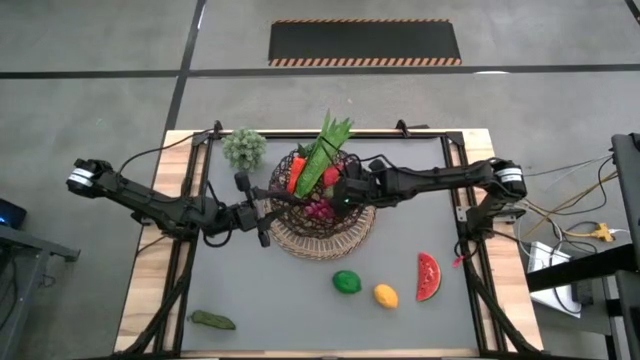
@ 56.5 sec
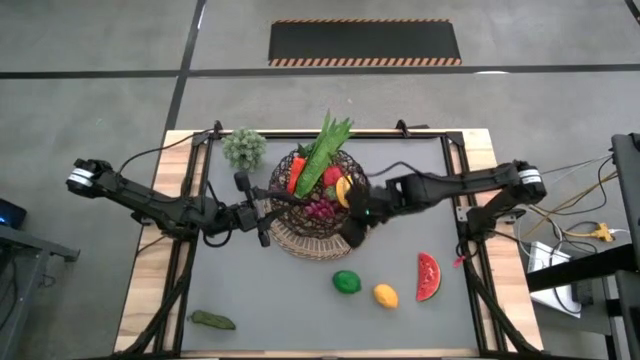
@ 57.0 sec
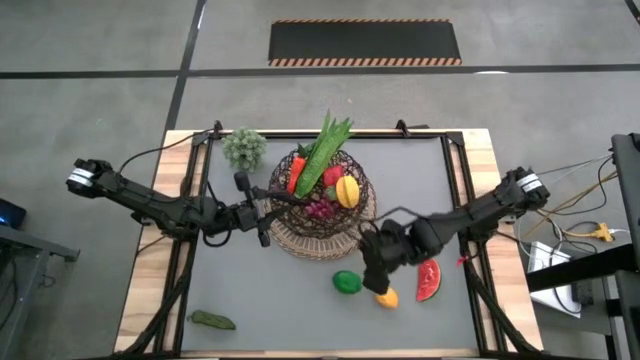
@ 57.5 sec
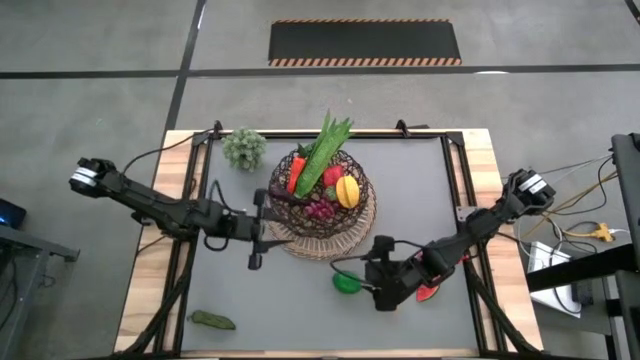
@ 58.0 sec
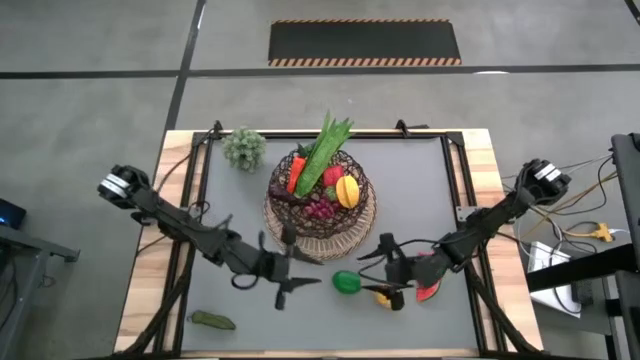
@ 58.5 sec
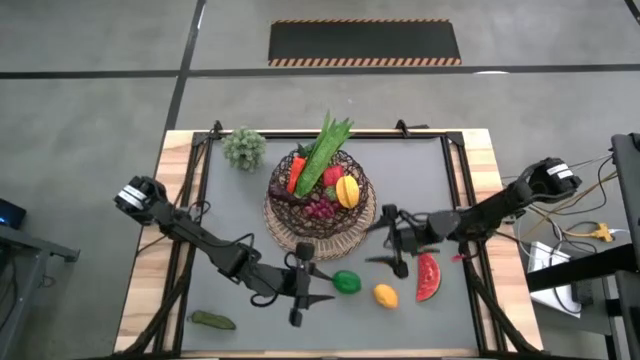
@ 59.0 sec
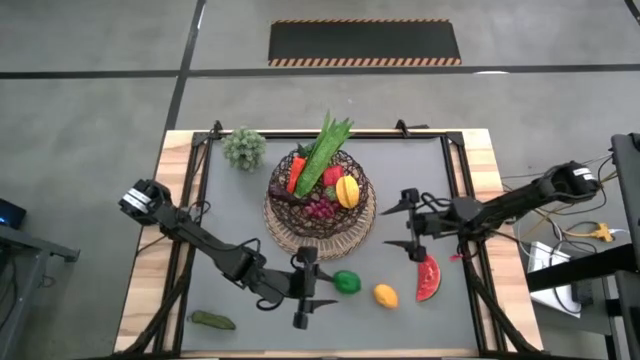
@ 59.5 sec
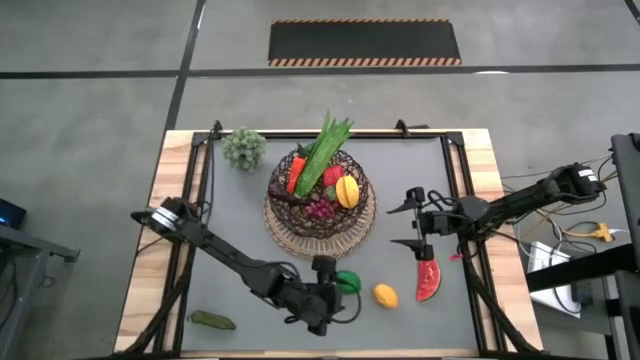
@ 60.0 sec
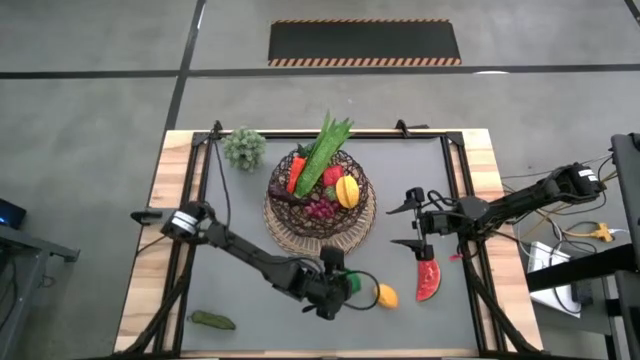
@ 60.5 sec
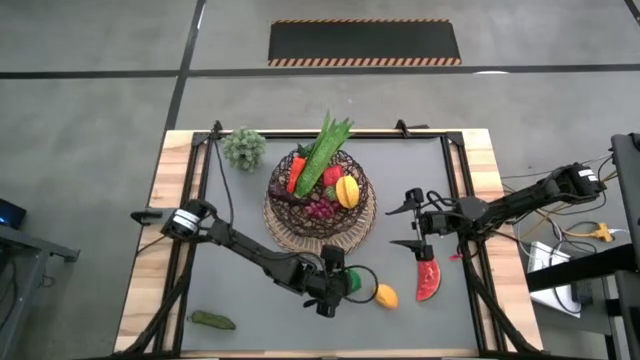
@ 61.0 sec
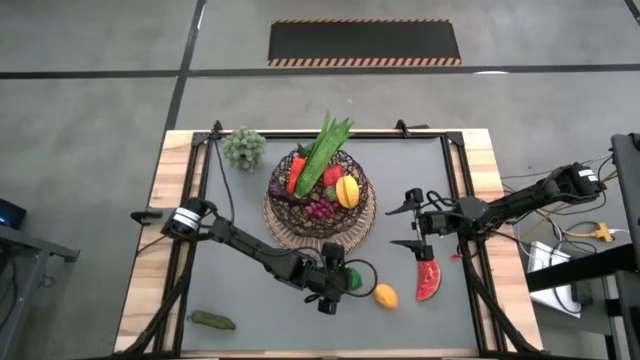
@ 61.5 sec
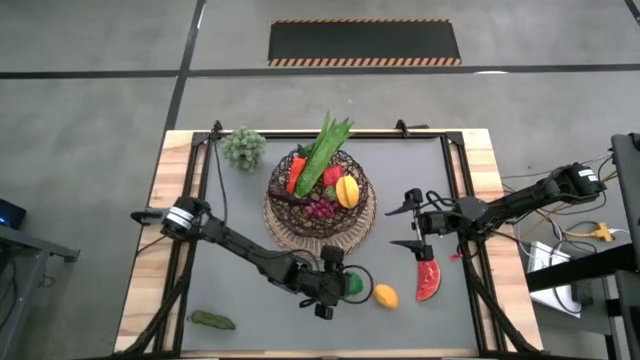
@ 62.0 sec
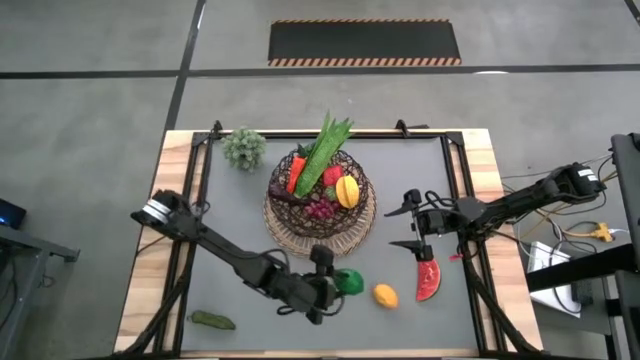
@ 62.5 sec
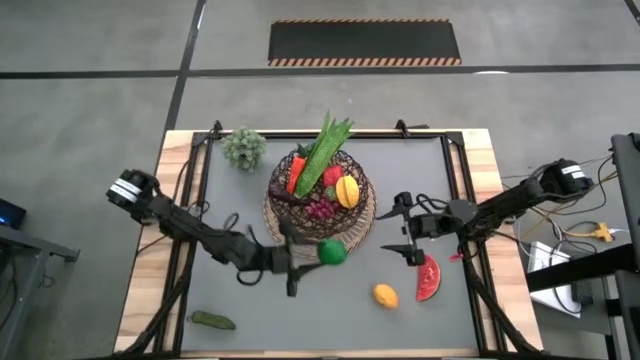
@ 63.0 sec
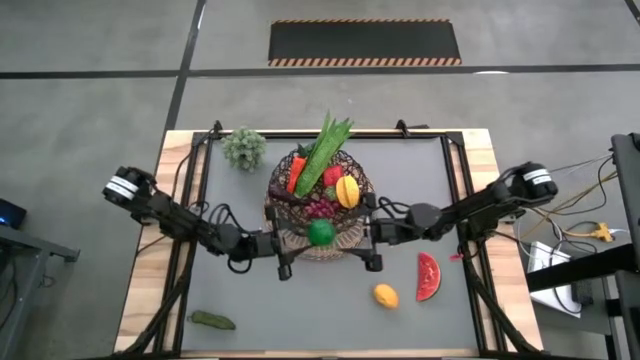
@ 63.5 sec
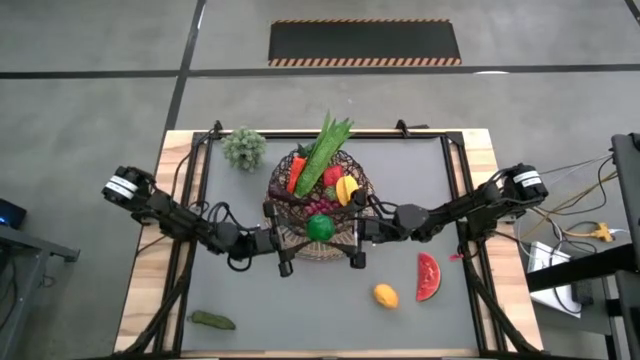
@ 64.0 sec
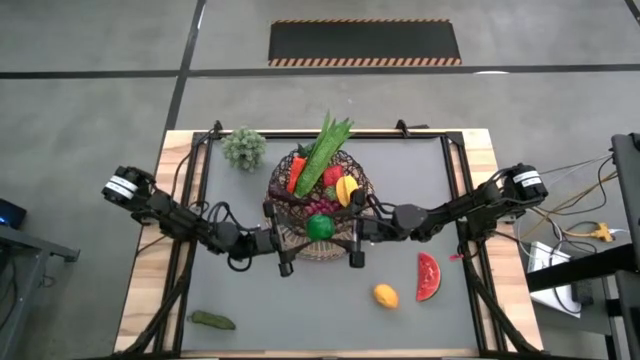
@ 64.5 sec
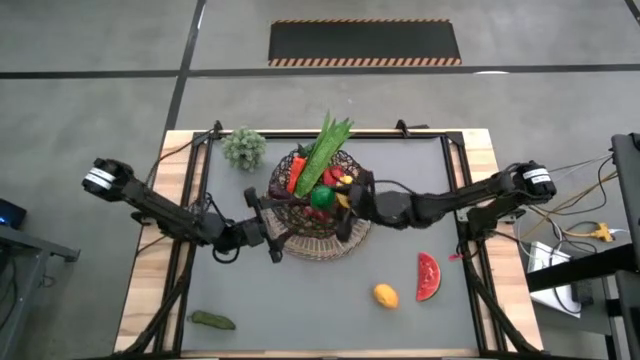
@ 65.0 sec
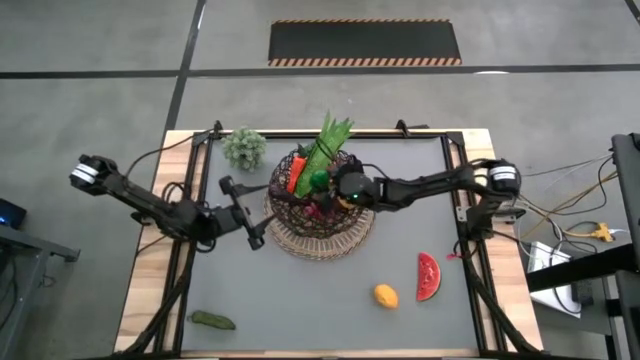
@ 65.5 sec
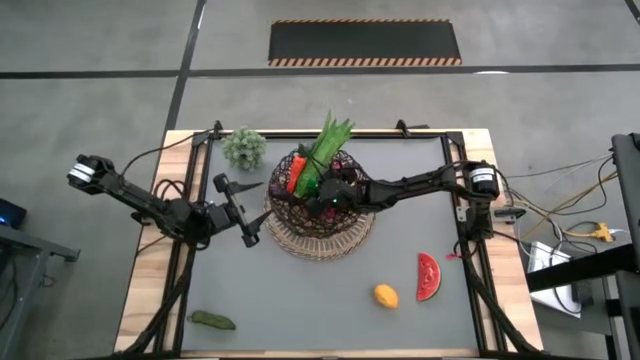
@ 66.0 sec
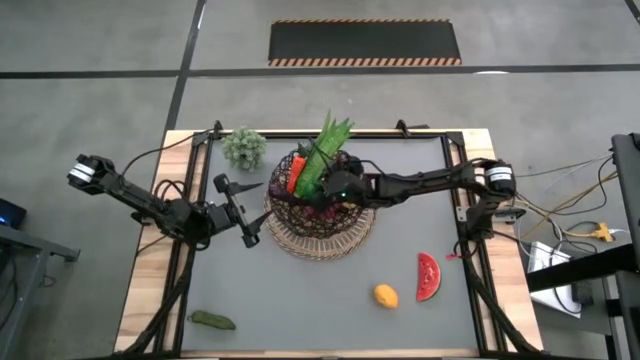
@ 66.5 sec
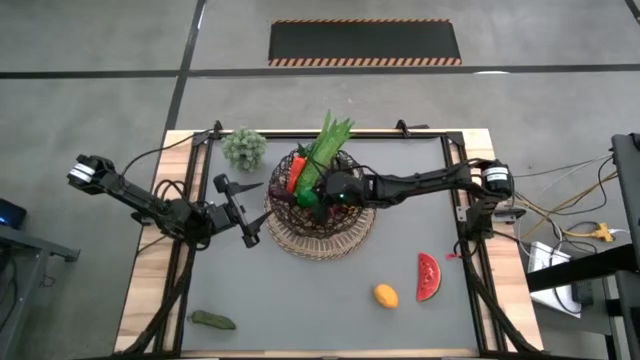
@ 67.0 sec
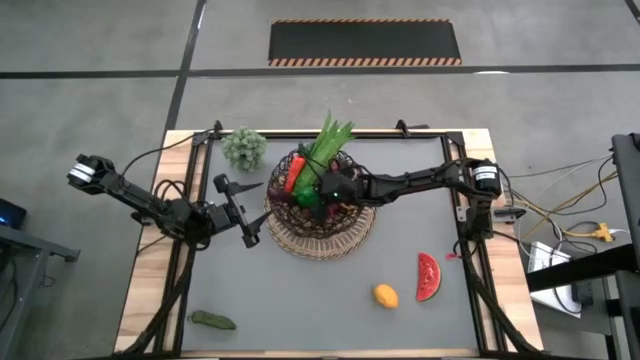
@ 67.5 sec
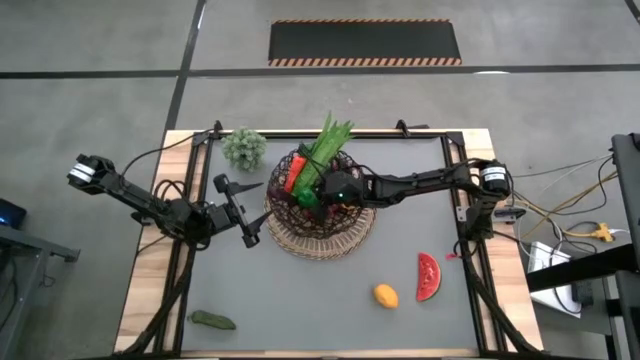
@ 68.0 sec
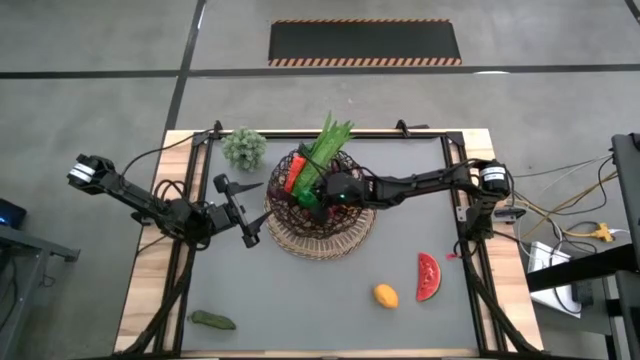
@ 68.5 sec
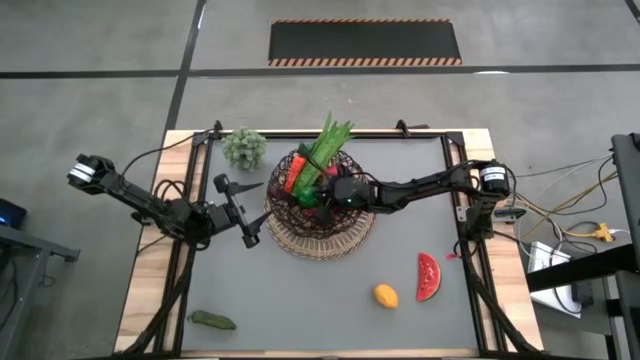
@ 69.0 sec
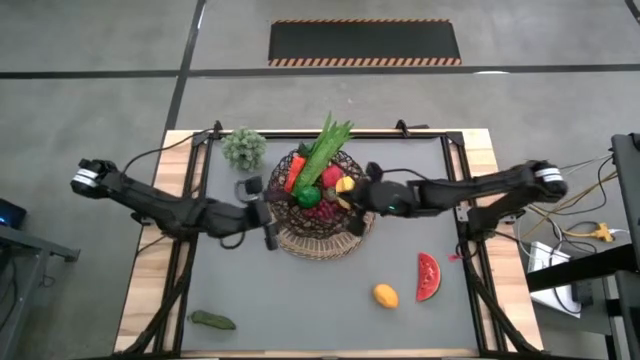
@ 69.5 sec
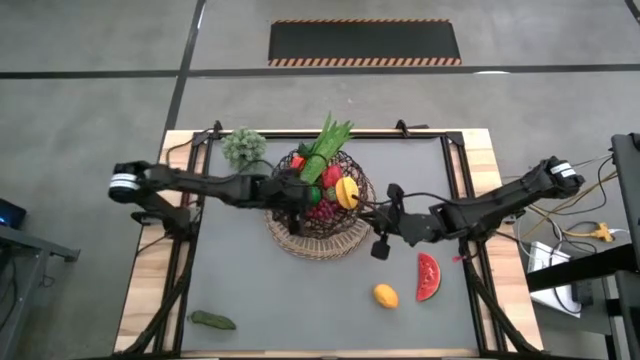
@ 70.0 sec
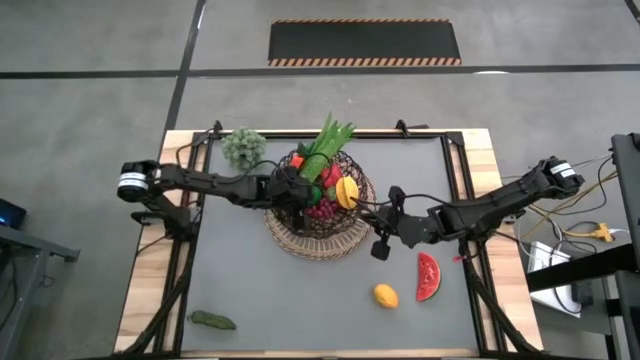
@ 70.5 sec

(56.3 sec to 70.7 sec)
Task: Build produce basket
Put the green lime into the basket

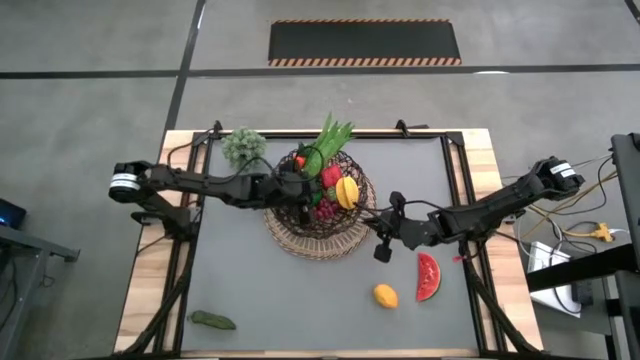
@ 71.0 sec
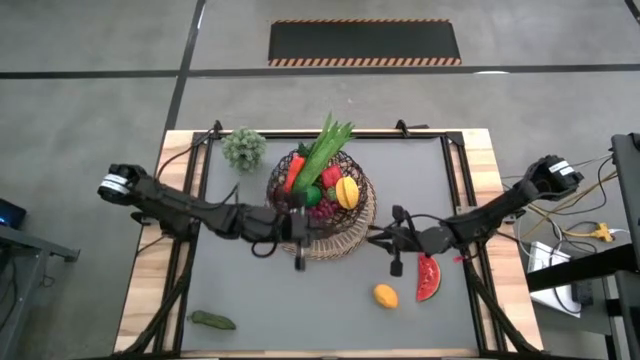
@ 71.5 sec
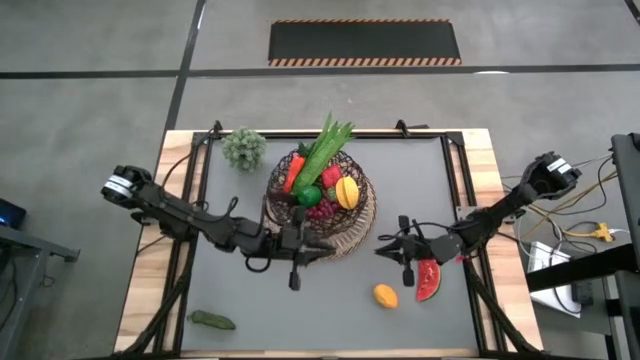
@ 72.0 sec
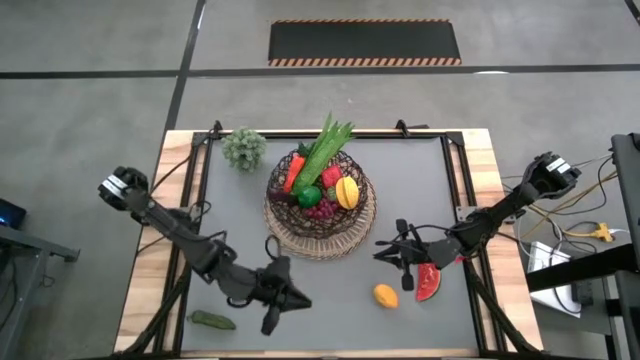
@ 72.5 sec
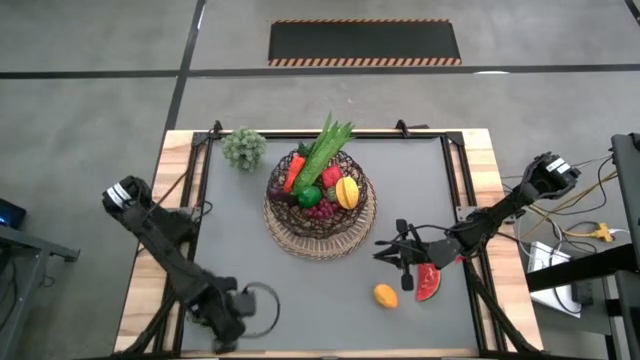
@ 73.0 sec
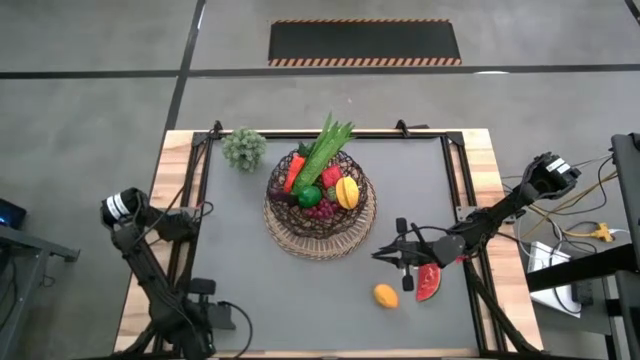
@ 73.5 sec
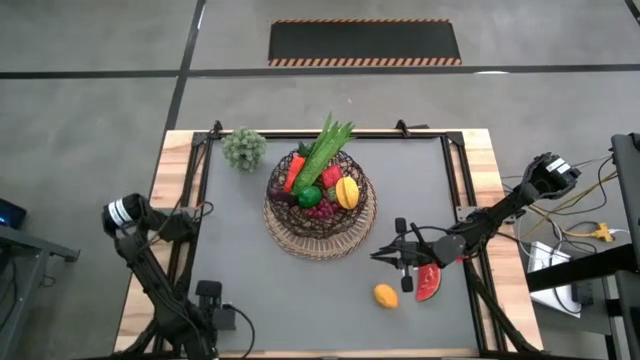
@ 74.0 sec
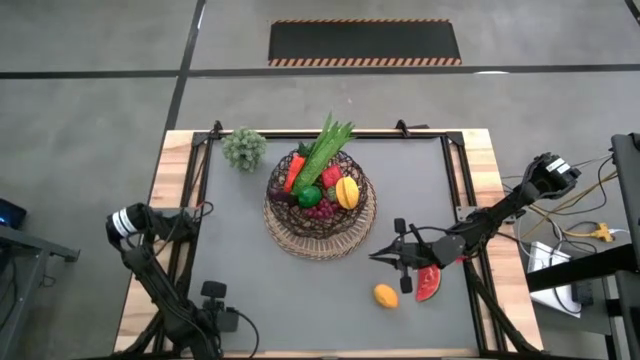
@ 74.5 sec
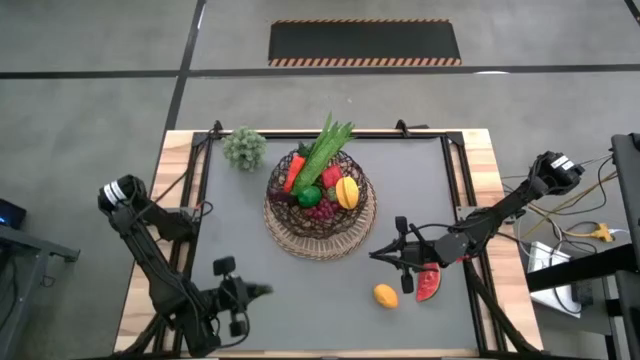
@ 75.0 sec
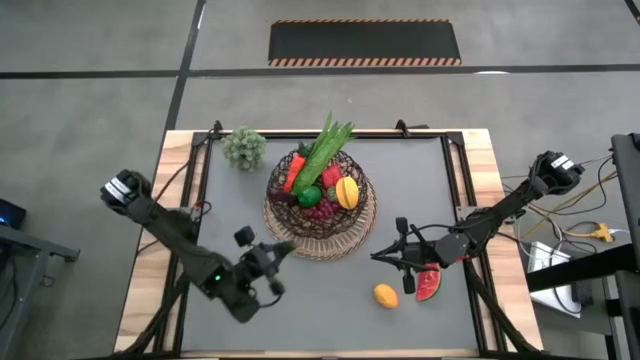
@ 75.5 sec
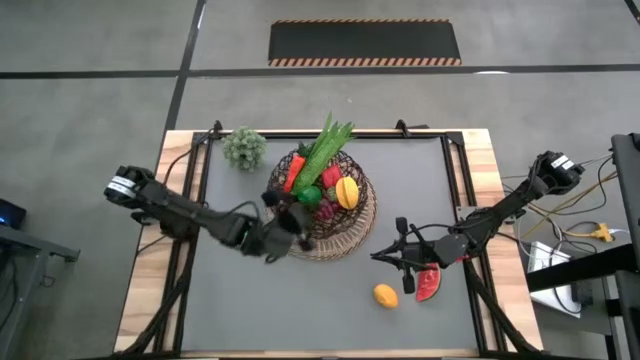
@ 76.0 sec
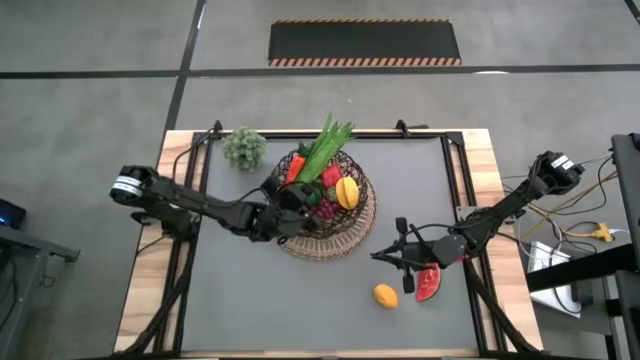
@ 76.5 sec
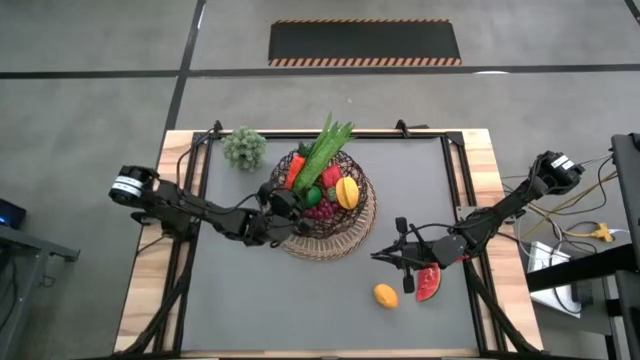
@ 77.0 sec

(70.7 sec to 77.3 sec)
Put the green chili pepper into the basket
